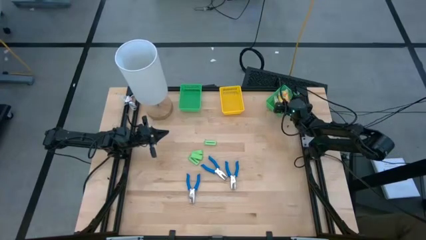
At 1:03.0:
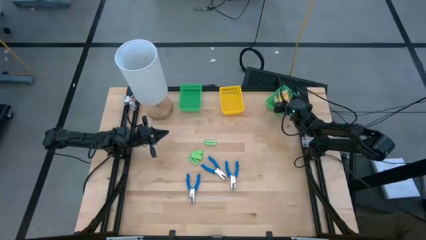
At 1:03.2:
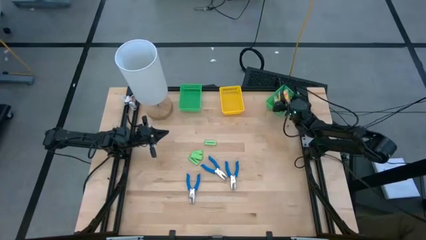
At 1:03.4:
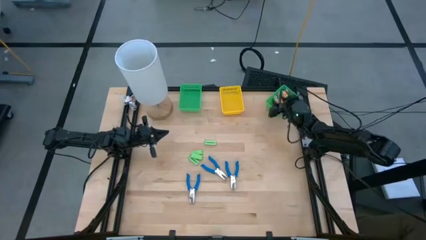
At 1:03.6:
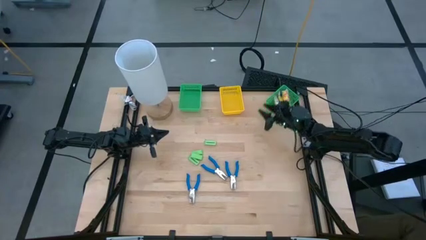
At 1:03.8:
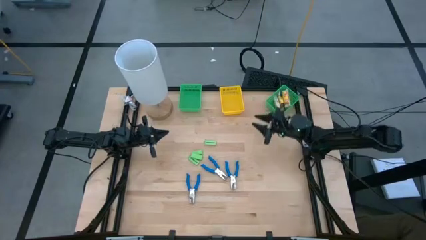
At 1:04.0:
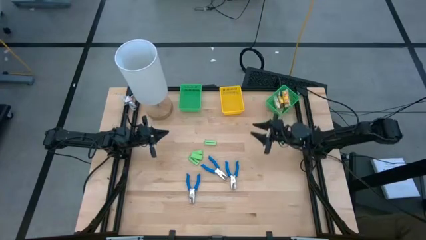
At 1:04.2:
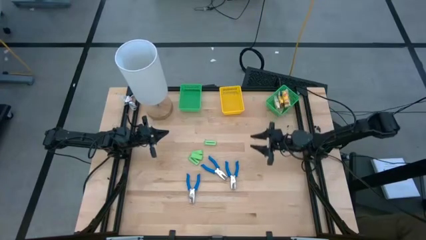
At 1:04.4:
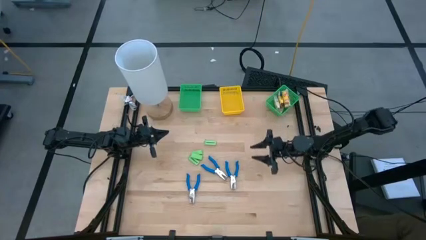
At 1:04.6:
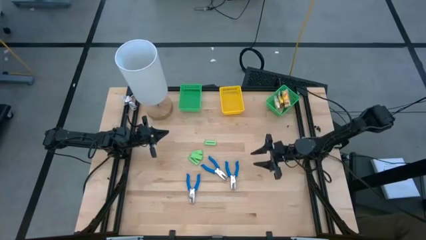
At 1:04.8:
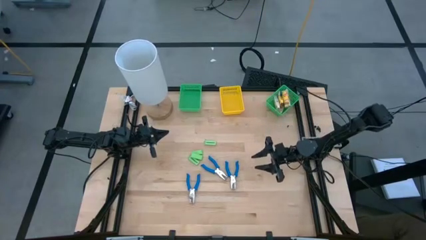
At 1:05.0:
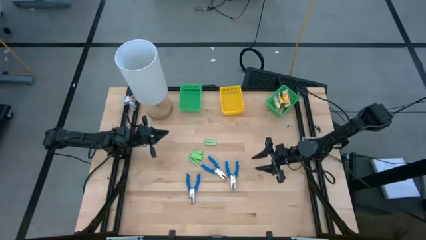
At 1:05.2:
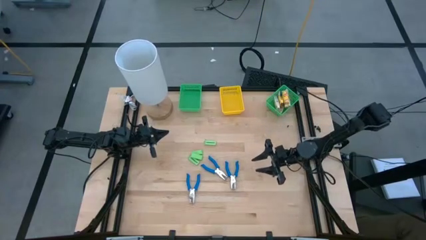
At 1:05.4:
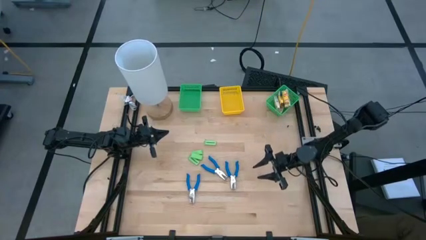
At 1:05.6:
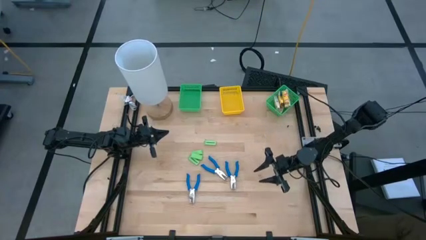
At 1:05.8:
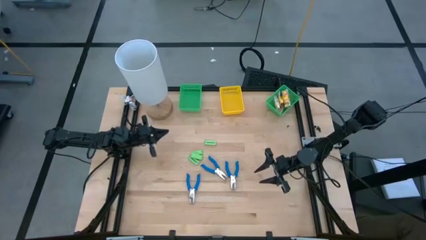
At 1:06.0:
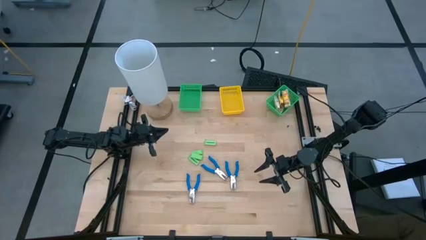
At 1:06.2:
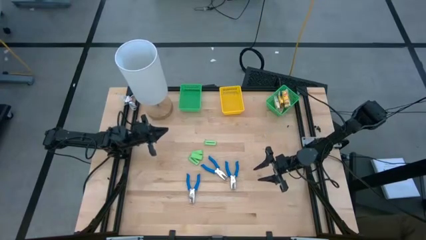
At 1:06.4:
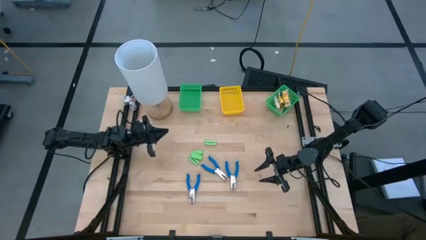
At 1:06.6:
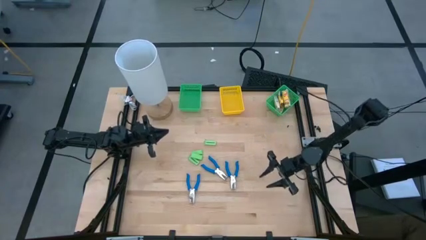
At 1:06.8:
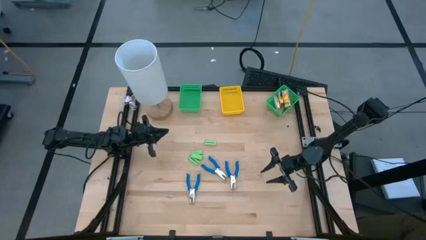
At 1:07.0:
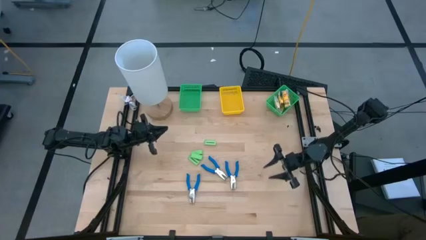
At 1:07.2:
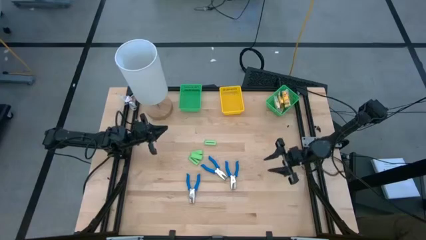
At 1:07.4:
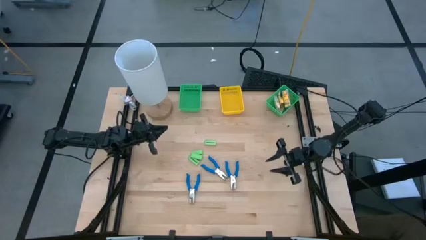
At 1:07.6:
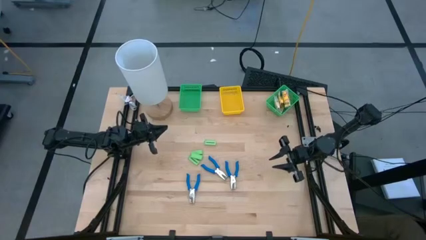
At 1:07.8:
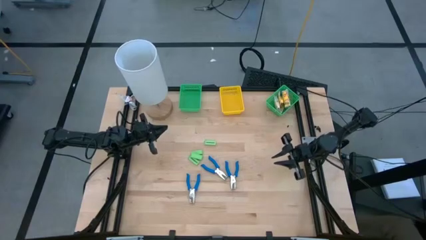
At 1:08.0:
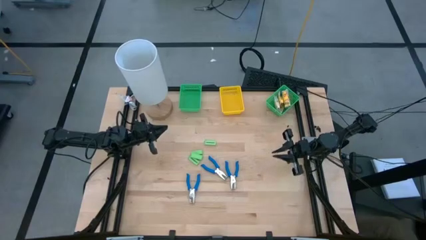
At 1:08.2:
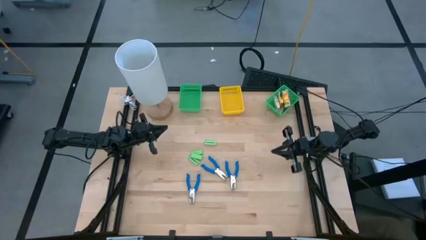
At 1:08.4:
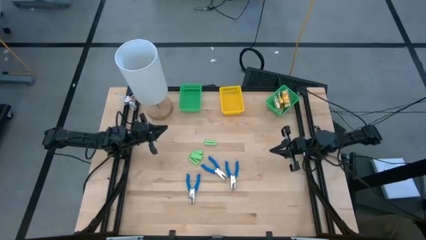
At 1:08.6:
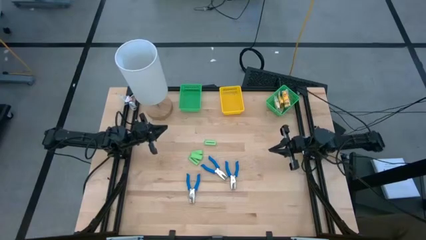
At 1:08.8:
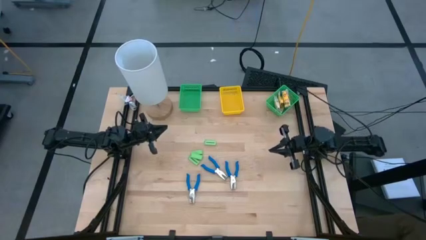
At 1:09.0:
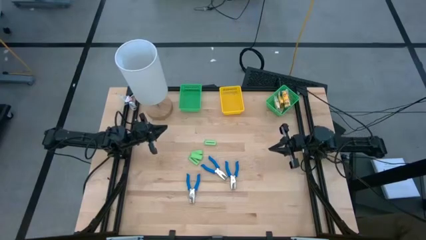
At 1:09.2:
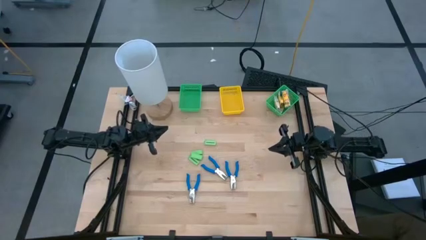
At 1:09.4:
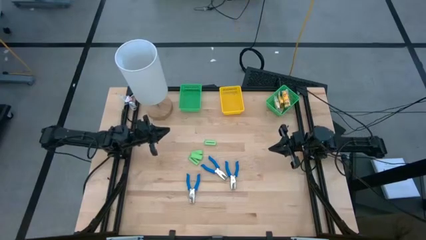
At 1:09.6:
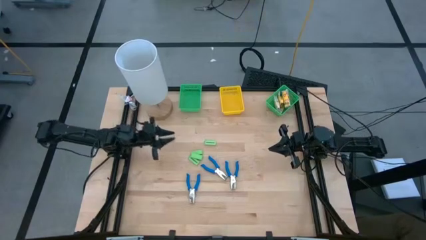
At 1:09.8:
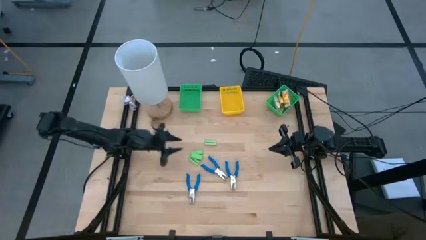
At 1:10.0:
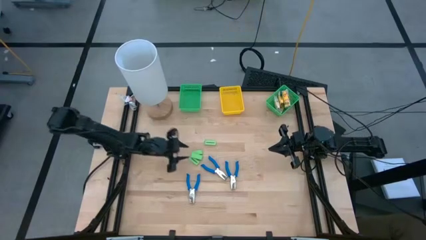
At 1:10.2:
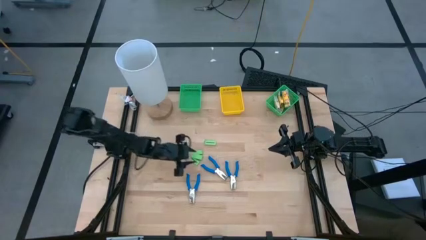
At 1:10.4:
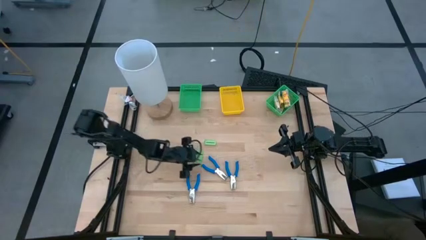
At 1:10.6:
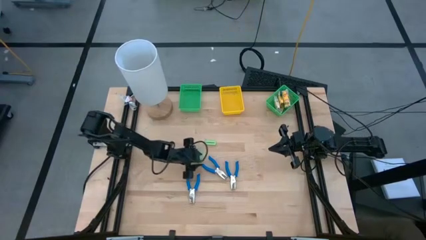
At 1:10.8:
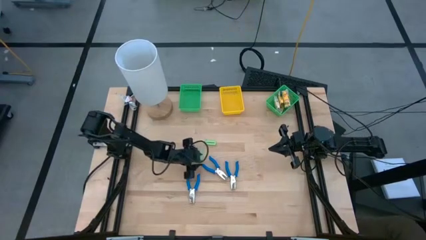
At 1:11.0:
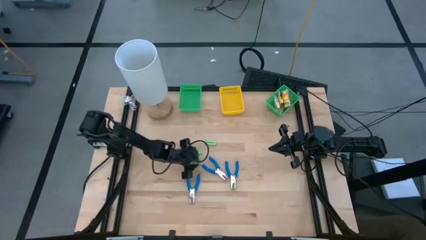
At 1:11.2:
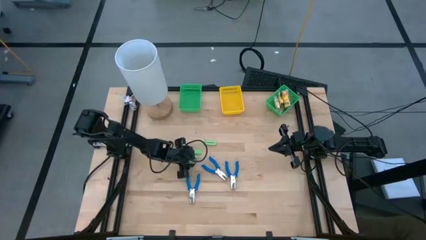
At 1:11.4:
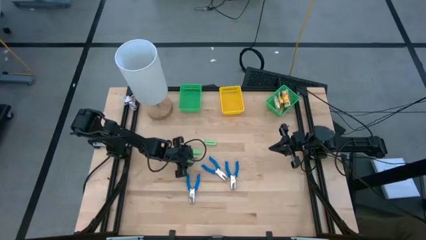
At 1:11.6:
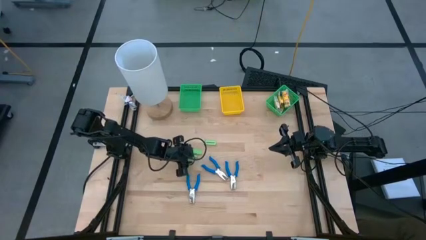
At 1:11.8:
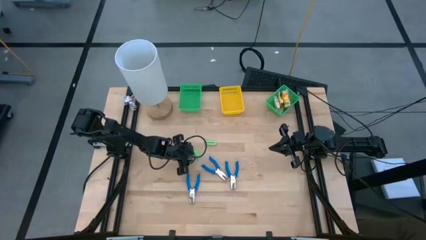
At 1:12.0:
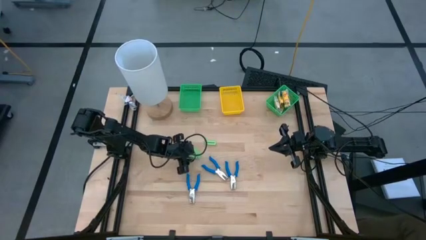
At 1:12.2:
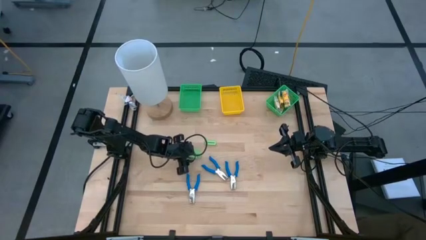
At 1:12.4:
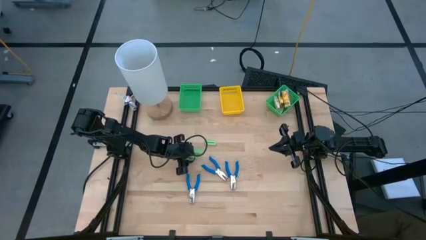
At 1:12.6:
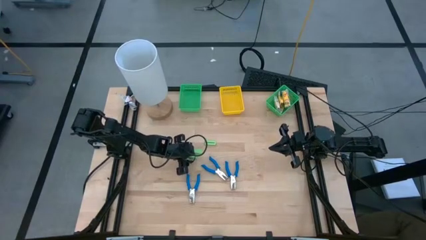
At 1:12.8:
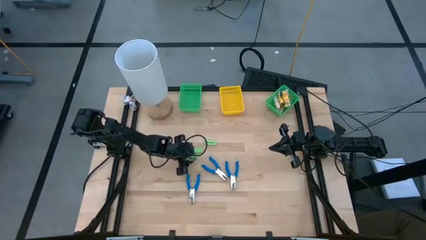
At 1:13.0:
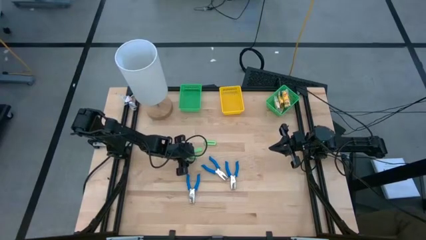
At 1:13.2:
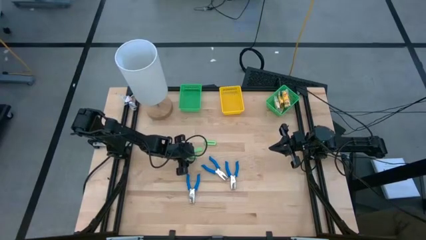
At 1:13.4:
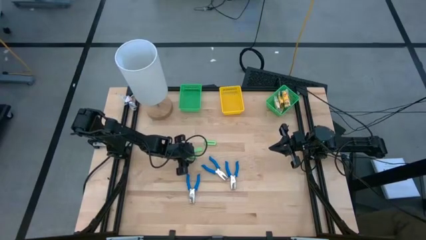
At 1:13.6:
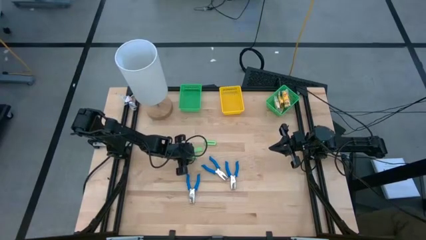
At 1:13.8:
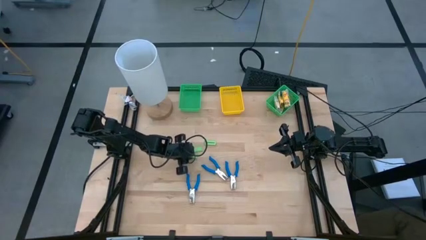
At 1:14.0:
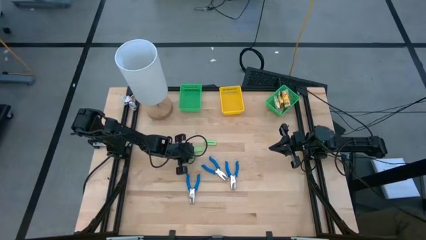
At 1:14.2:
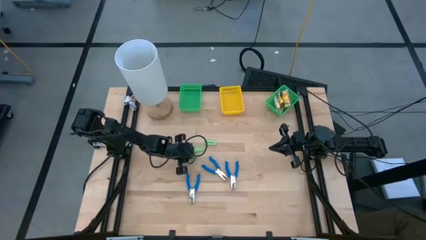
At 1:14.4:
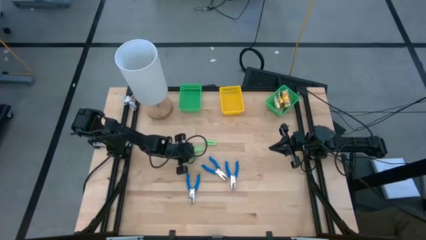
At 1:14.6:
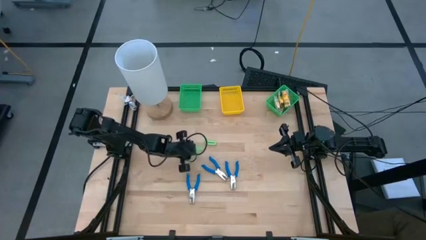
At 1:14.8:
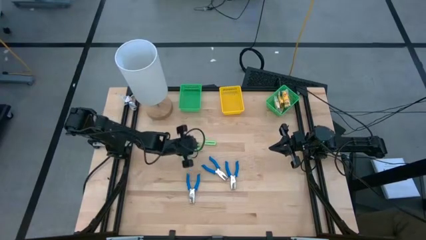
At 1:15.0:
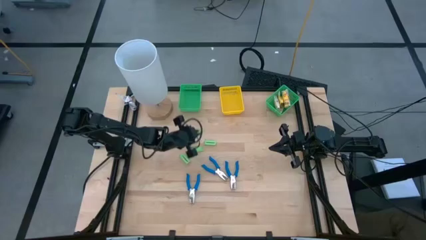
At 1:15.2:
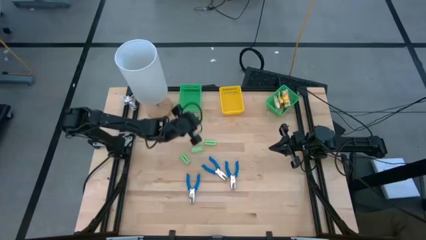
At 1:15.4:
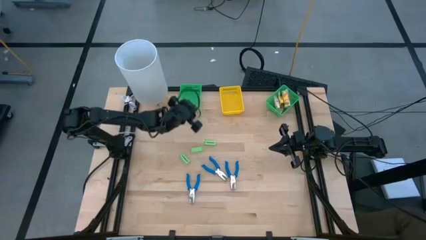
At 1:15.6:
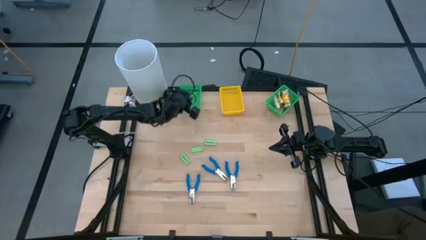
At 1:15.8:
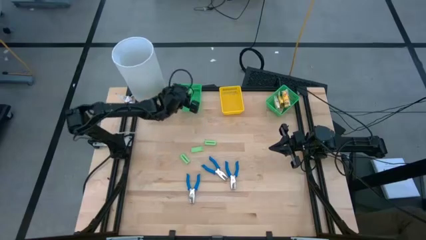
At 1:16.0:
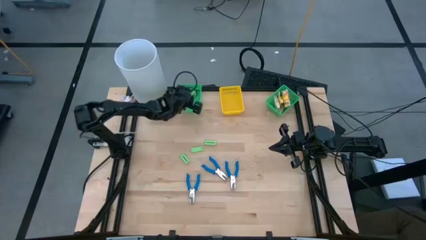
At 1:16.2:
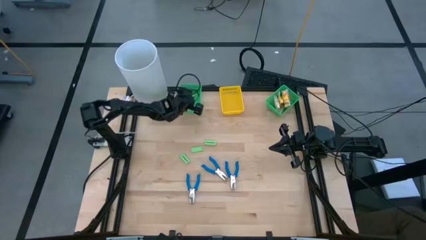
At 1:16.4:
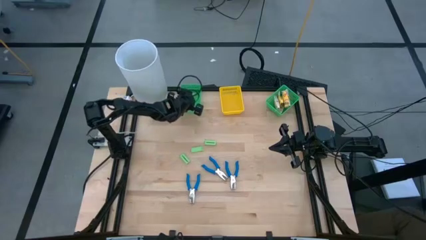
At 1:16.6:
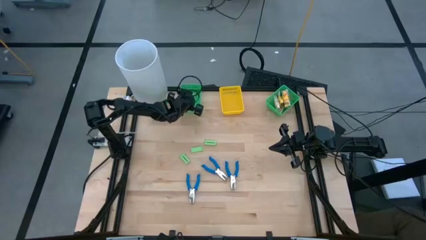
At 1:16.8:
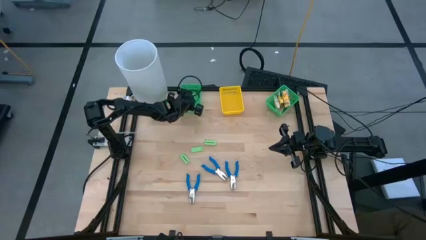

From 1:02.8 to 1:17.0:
Task: Pick & Place School Supplies
Put the green eraser into the left green bin

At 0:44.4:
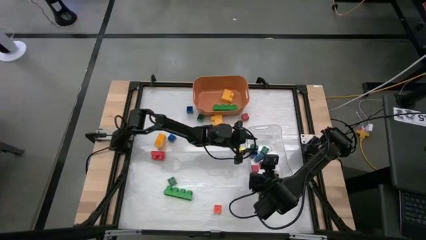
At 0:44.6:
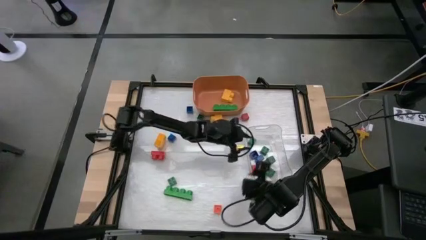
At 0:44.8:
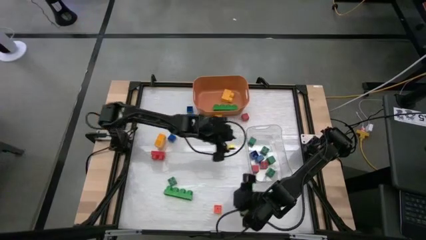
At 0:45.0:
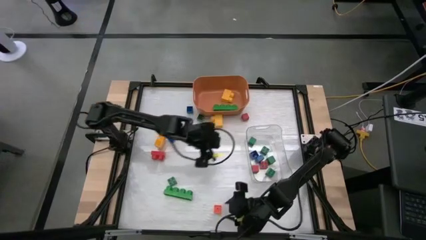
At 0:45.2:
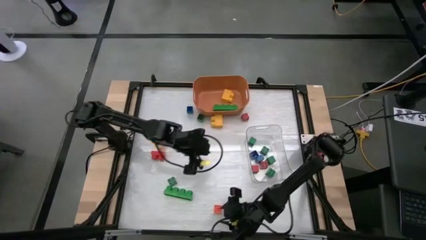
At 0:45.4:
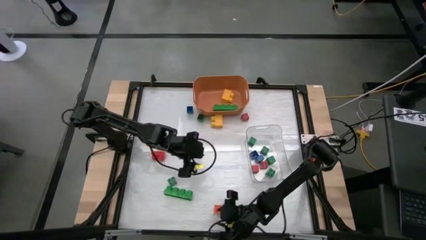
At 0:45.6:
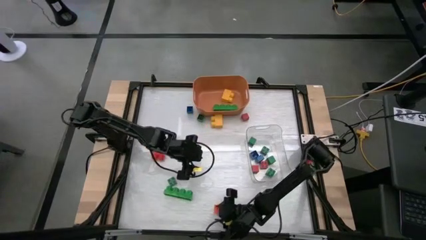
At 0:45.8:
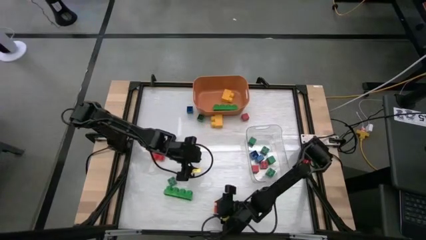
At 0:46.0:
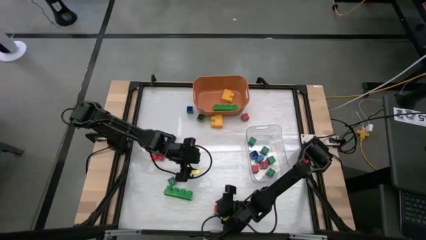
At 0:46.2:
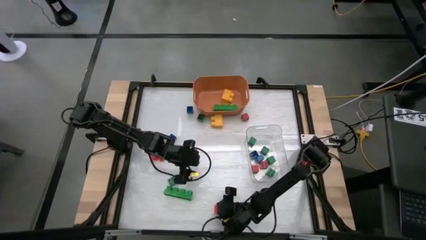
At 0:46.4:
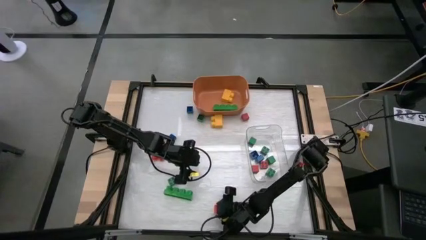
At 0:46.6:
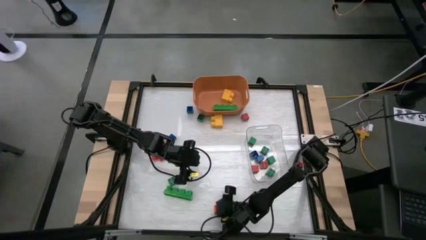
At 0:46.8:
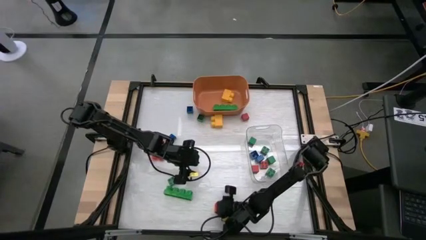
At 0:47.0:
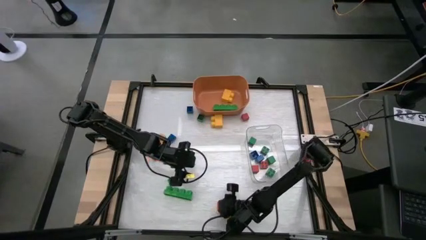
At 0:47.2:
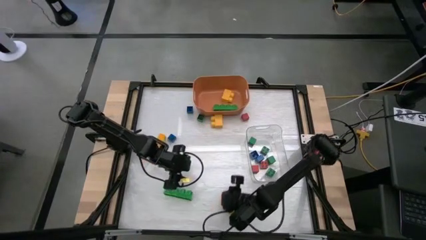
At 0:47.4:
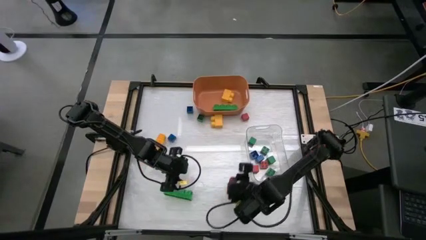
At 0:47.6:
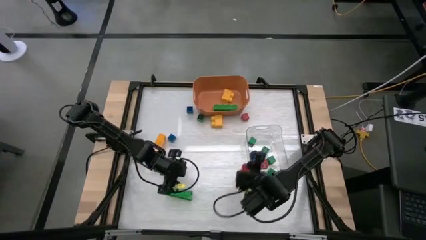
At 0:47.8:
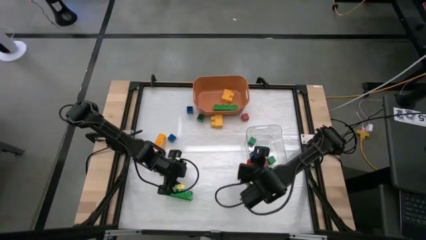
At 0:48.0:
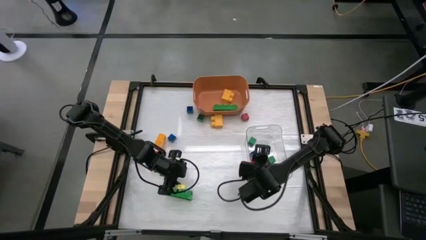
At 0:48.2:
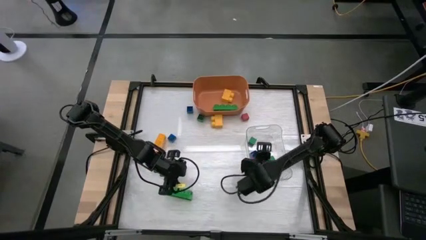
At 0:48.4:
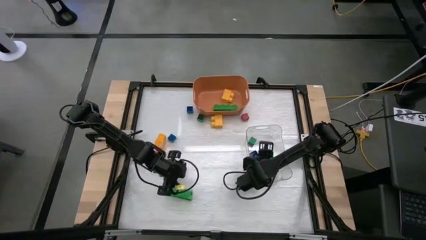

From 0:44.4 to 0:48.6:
Task: Sort blocks by size
Put the small orange game piece into the transparent bin
